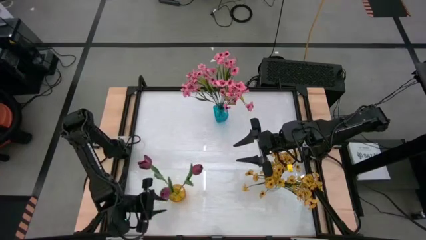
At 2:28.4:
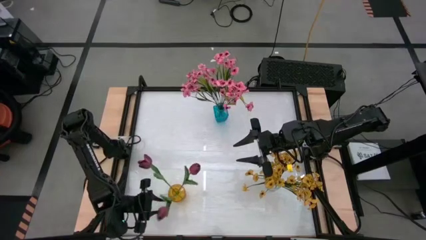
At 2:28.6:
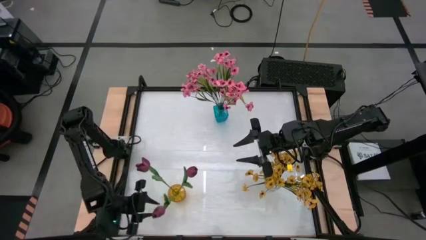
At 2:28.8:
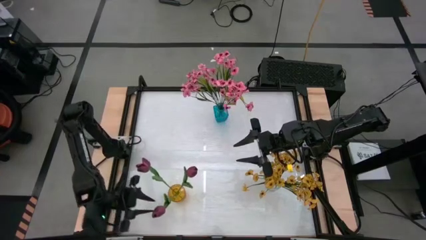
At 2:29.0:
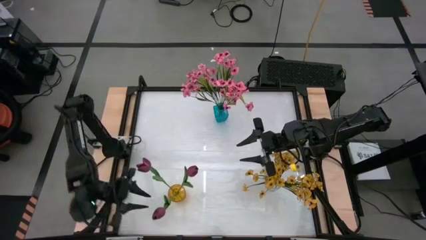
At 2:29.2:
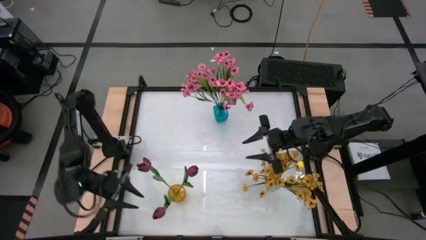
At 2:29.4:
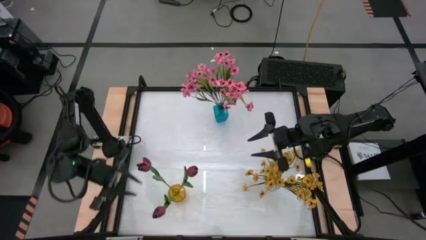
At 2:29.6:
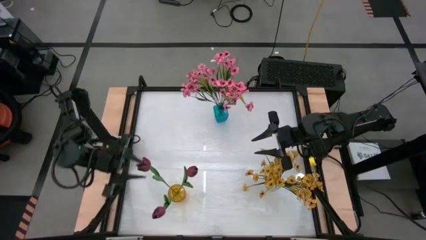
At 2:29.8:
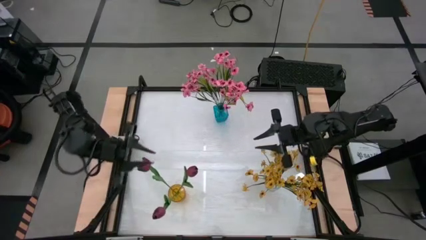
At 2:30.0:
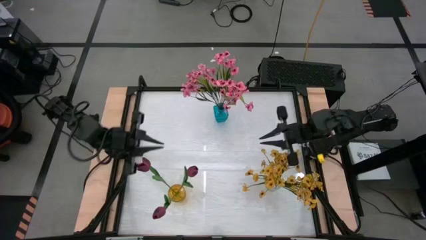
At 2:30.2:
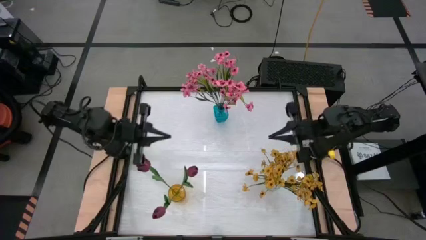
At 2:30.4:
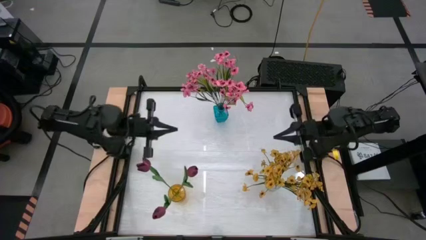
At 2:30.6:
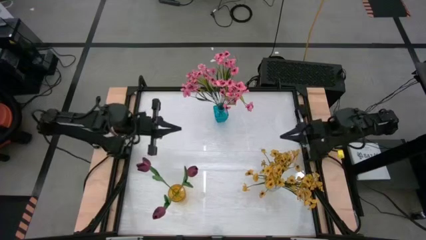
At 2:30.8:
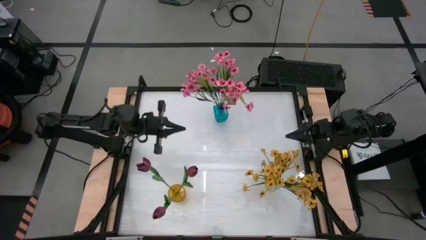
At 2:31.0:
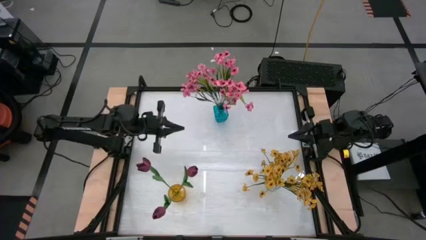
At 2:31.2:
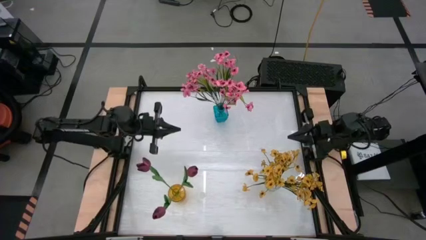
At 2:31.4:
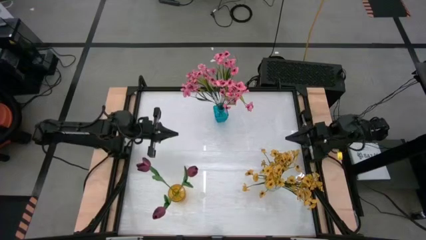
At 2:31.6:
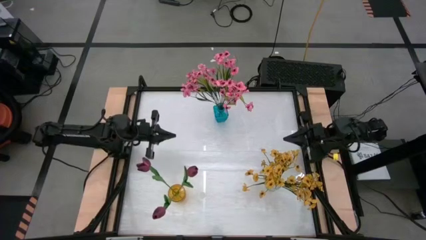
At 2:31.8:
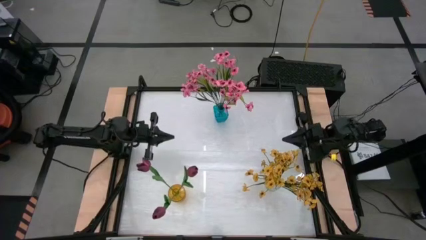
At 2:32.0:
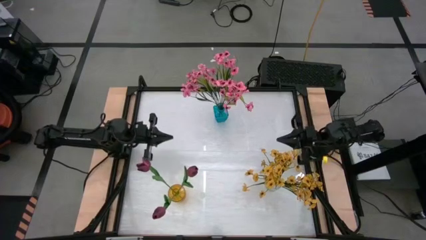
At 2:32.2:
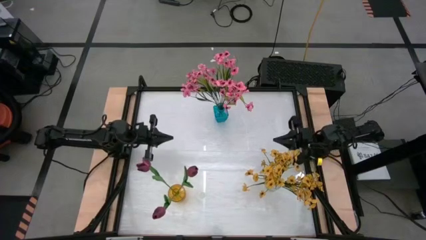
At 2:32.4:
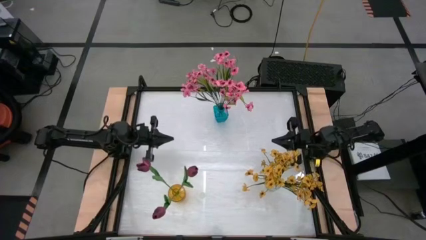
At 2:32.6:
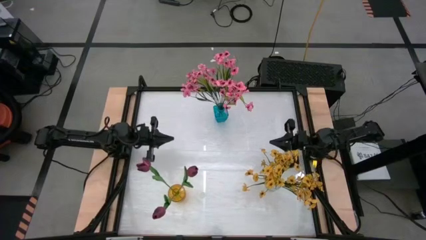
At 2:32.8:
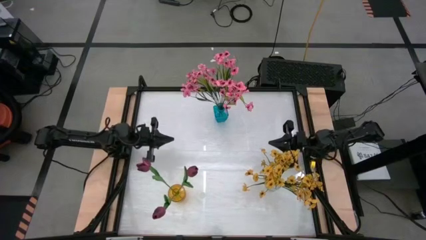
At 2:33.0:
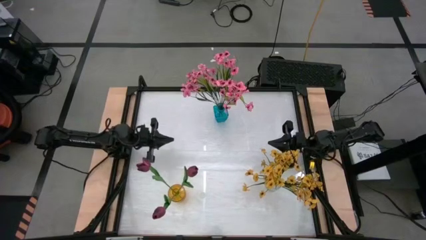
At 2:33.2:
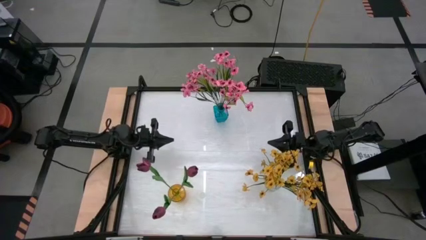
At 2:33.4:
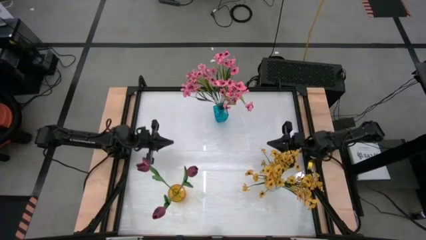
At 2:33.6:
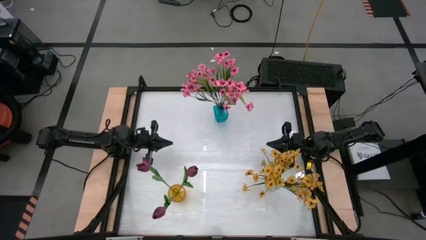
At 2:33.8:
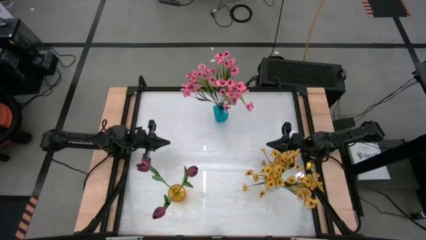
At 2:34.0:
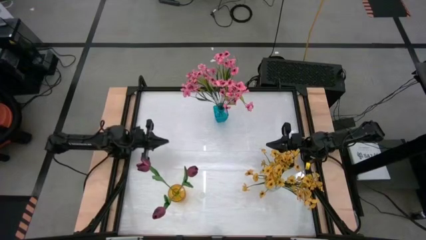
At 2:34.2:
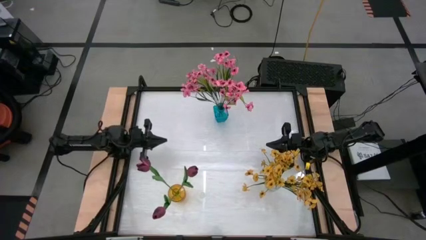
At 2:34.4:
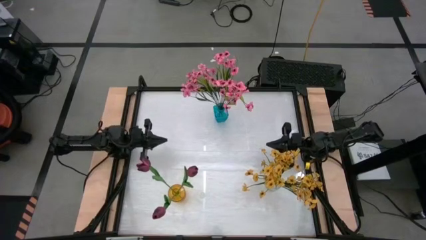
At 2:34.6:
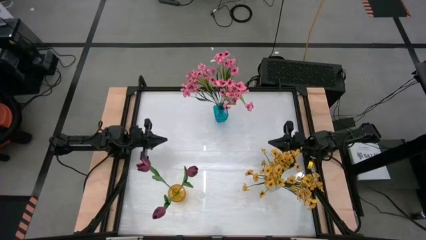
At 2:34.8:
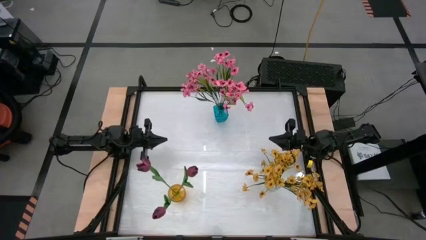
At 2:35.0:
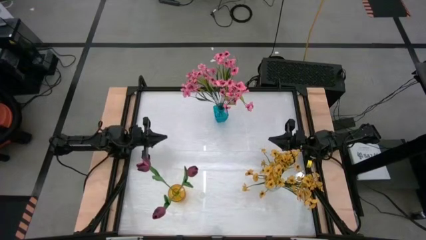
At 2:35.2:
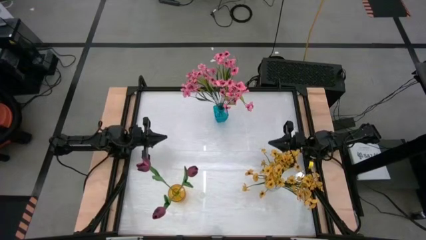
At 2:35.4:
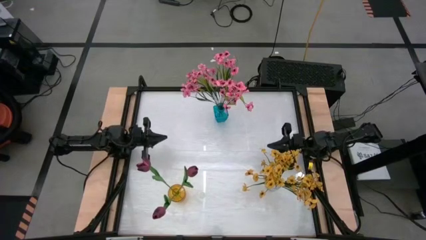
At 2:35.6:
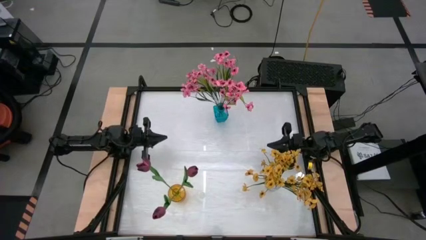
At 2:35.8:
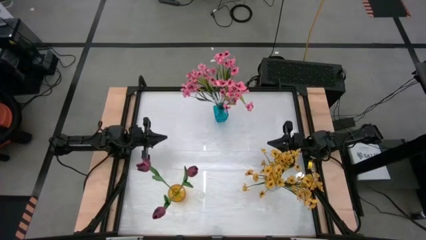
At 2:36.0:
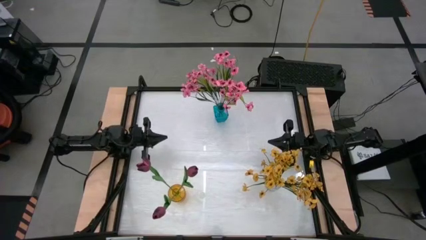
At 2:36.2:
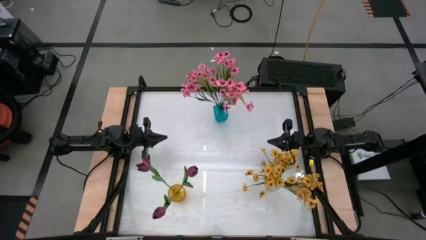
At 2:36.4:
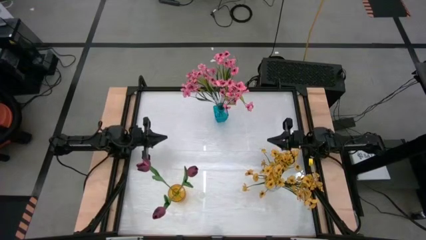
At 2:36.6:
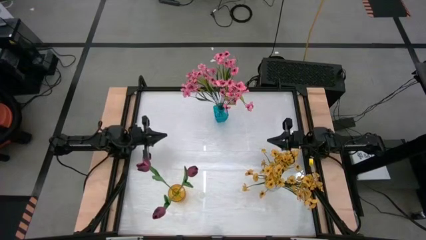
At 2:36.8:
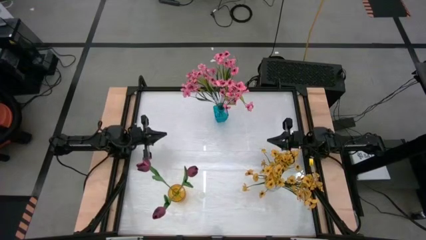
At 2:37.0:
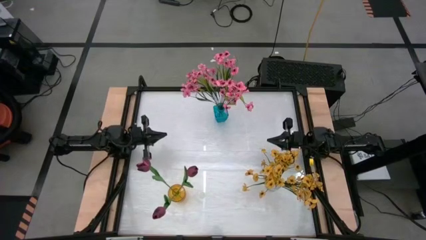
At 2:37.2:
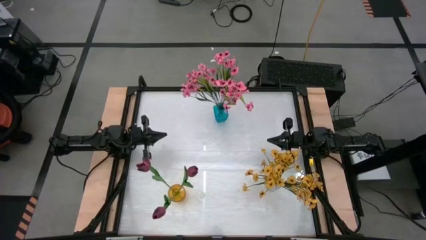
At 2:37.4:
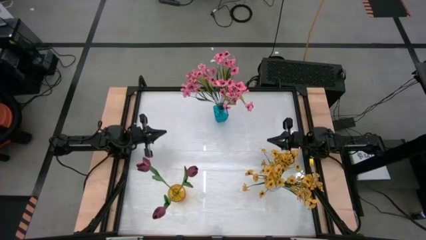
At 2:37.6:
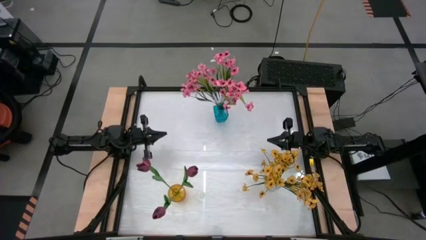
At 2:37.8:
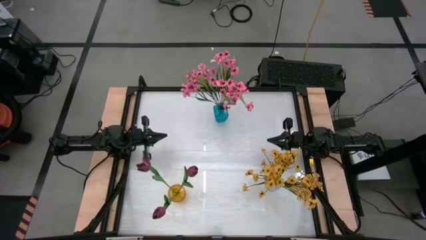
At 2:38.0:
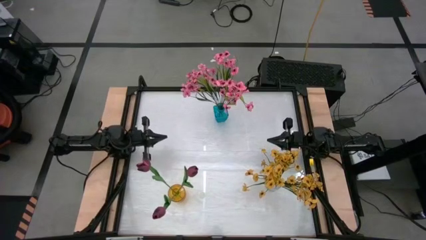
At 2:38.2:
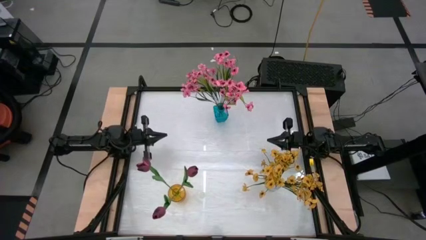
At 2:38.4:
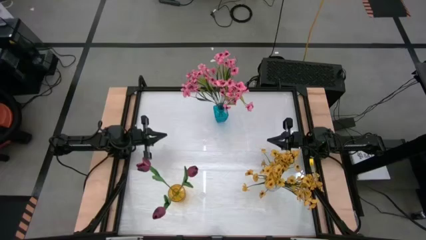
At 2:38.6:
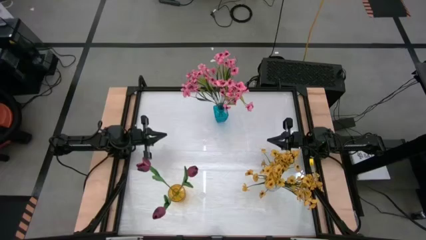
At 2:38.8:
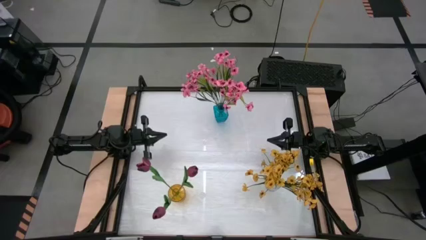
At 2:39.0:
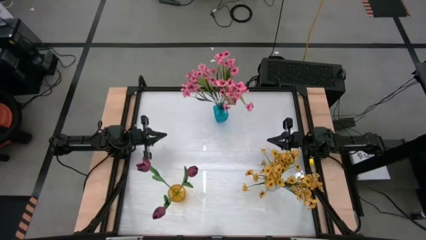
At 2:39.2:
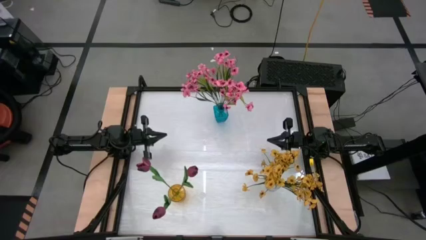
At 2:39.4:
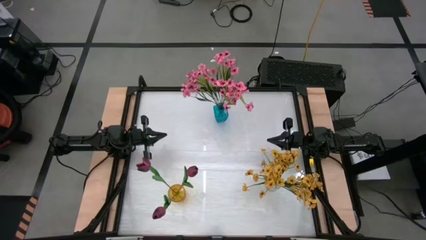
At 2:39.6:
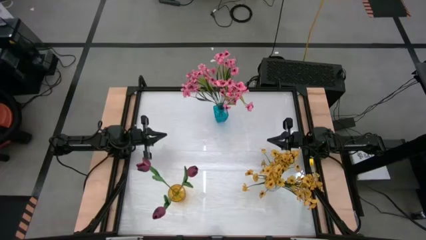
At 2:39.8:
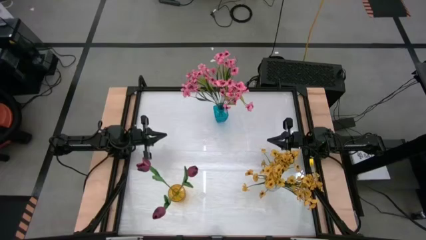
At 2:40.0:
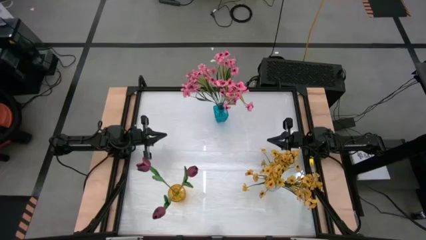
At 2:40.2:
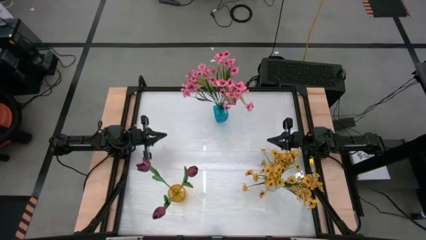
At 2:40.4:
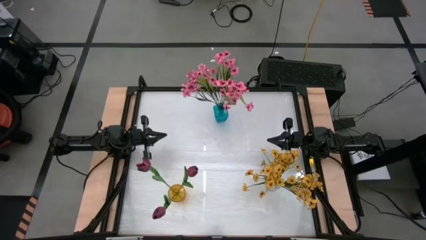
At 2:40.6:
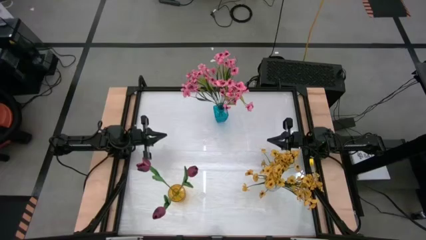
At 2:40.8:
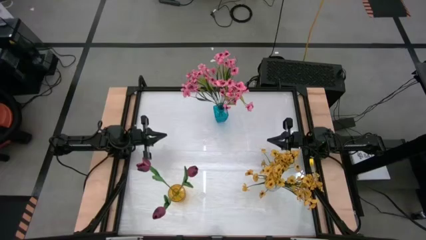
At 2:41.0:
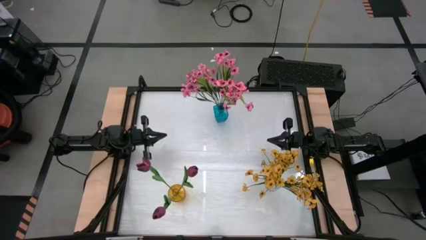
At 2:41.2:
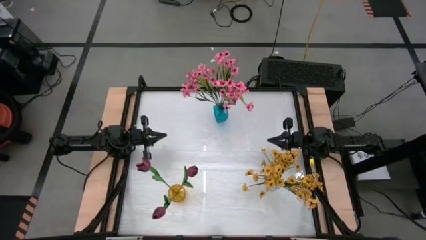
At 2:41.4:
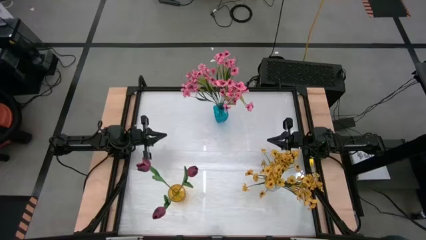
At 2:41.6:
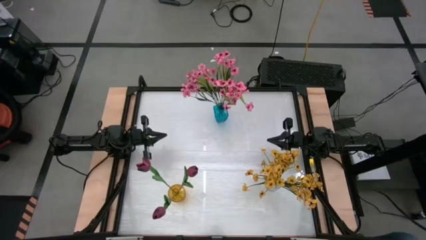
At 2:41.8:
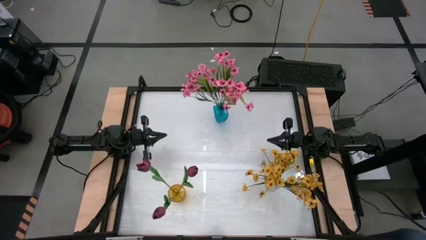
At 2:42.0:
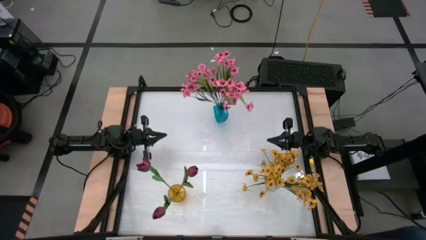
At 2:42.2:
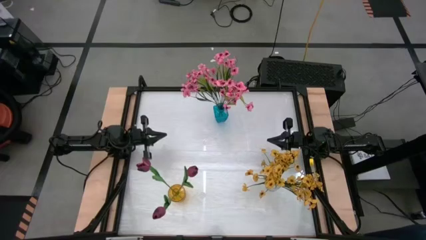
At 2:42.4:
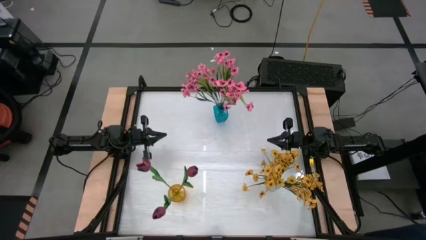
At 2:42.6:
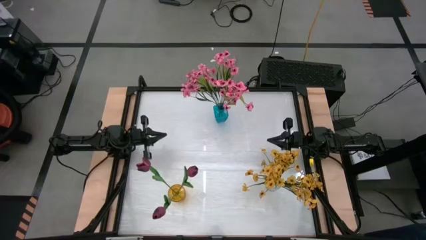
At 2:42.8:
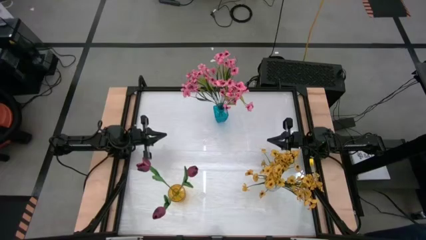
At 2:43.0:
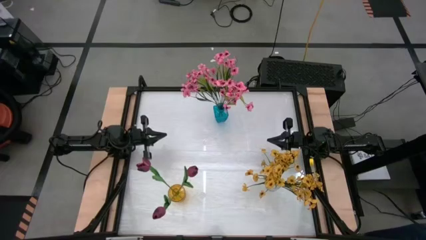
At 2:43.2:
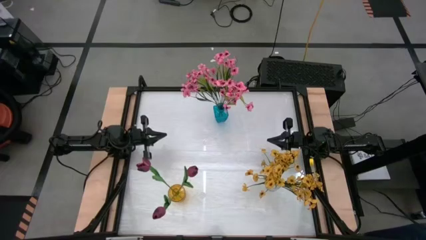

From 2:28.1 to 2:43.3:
Task: Sort flowers into vase by color
Return to Home Position

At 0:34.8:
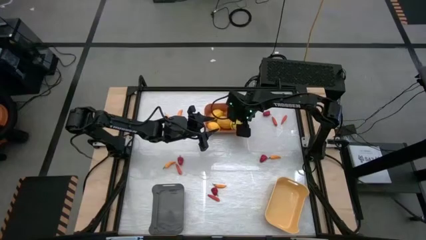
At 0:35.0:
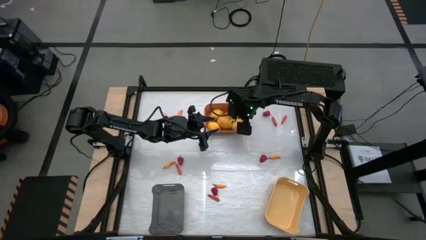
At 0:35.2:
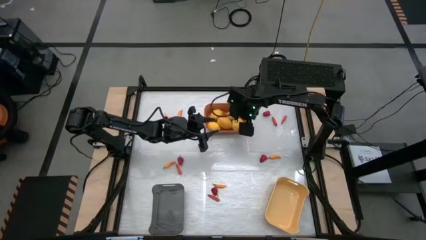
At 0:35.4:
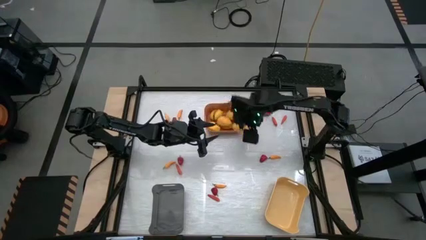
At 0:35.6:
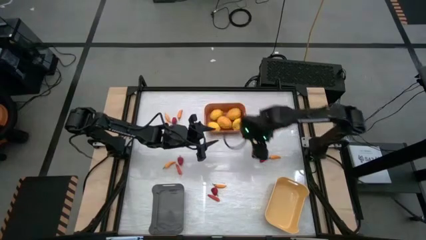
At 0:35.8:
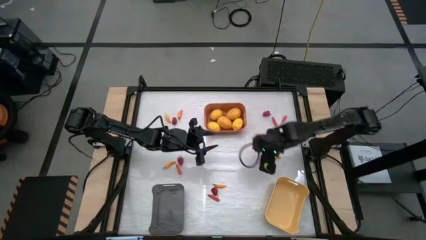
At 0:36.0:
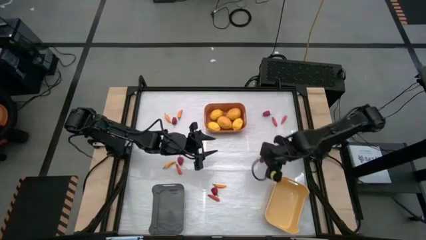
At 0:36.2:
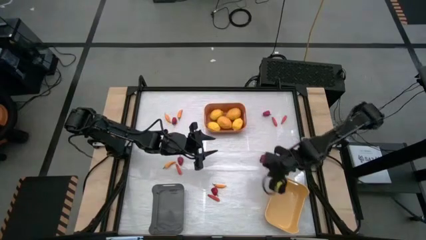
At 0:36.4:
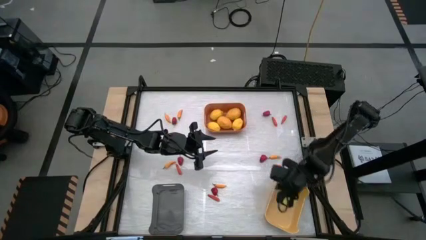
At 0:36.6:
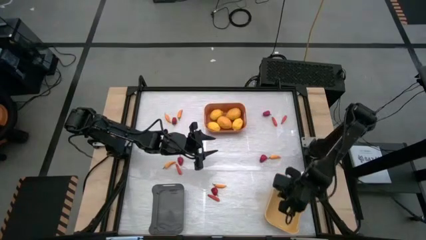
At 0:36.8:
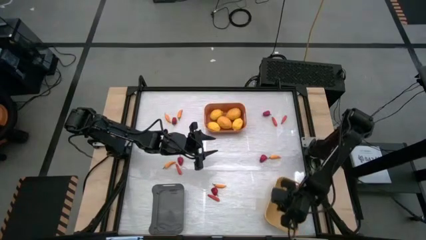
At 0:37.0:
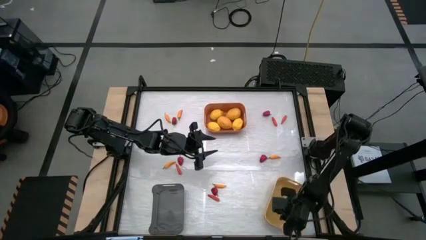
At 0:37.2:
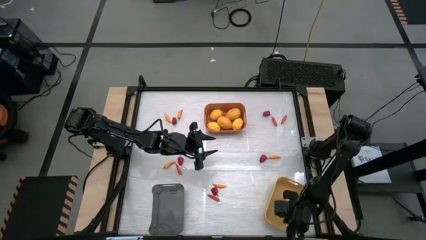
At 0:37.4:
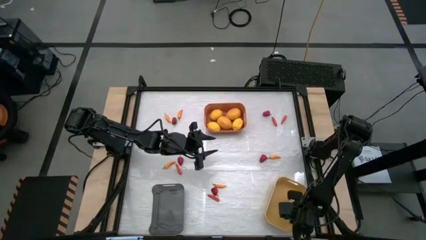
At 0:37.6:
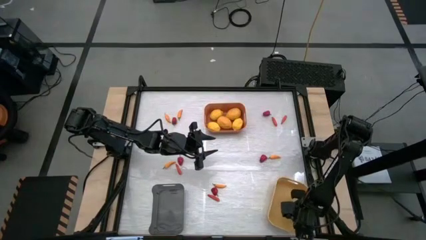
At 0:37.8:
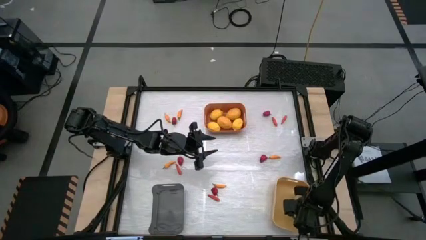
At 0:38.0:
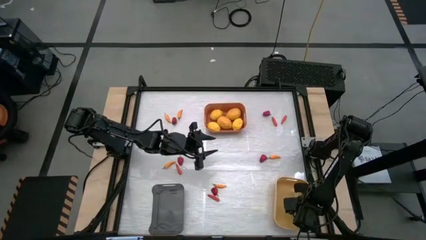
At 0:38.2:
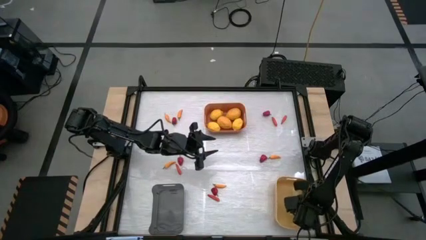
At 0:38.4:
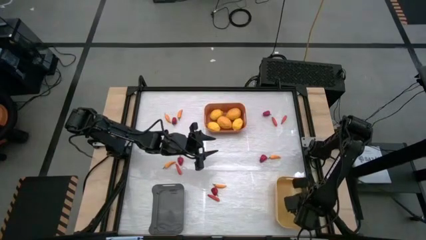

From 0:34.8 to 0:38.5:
Task: Sort produce into baskets
Adjust the yellow bin
